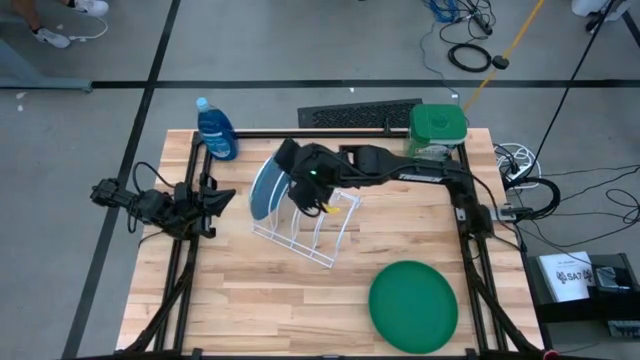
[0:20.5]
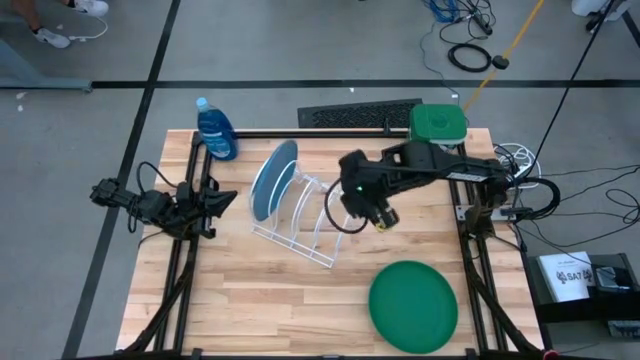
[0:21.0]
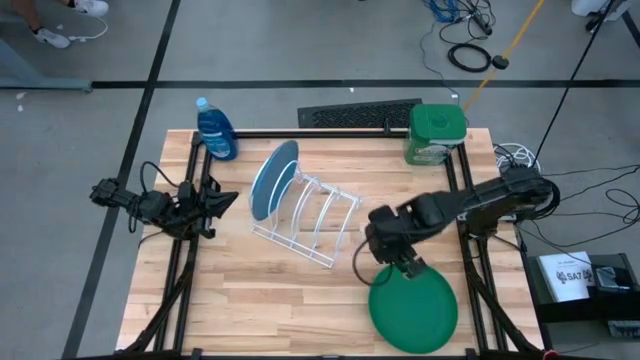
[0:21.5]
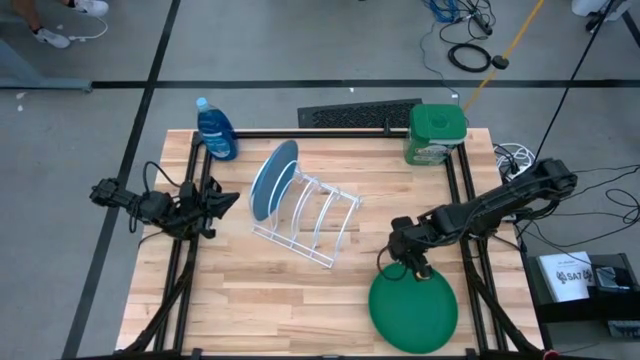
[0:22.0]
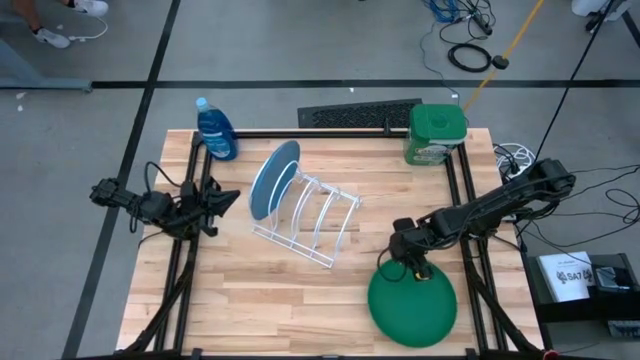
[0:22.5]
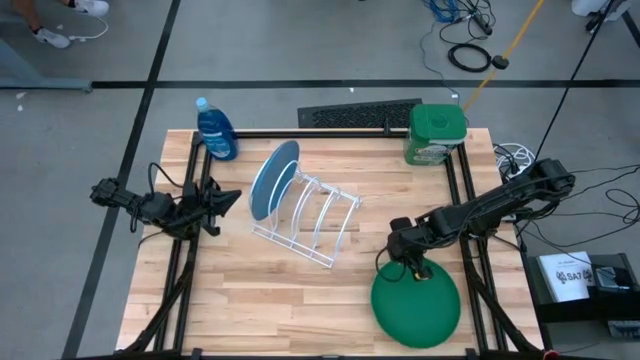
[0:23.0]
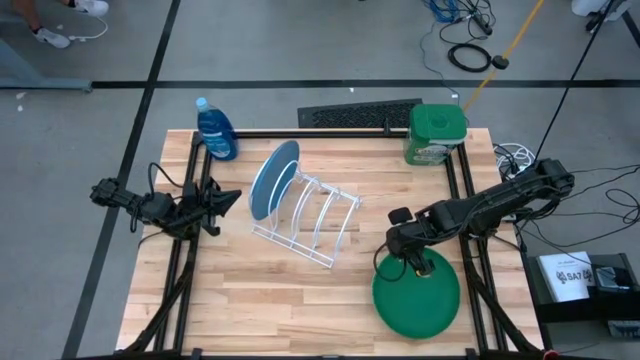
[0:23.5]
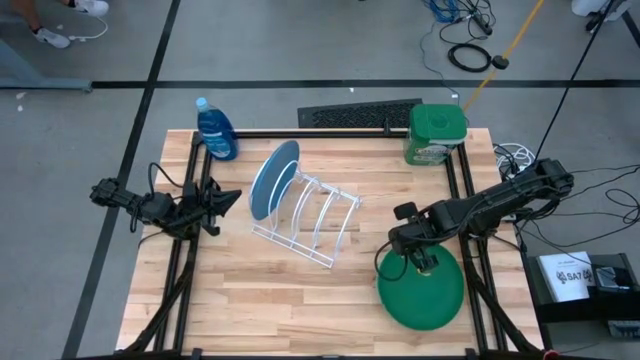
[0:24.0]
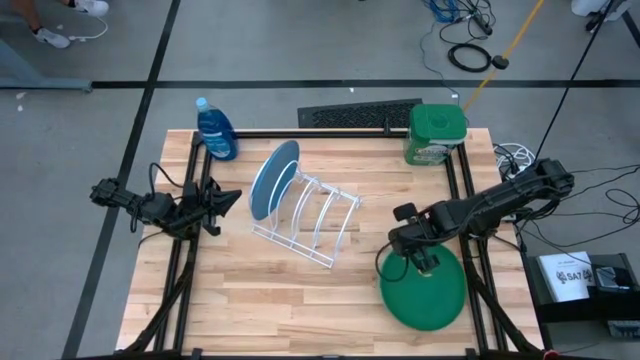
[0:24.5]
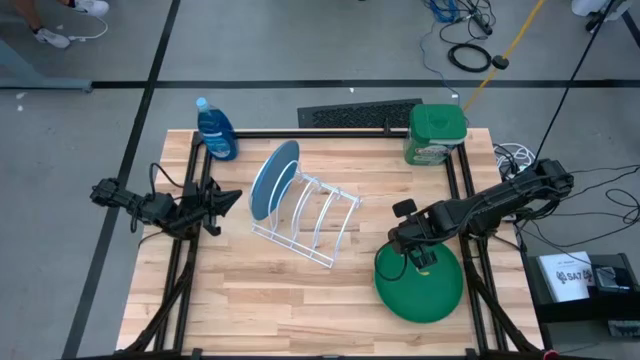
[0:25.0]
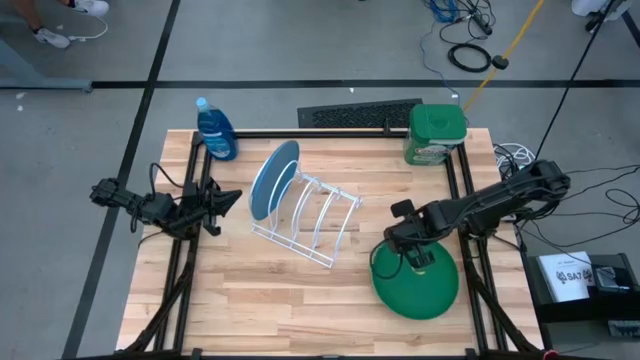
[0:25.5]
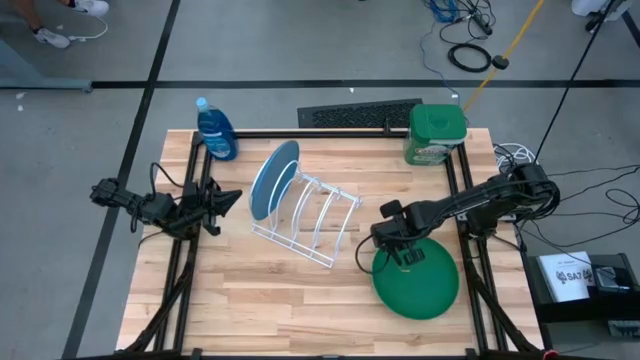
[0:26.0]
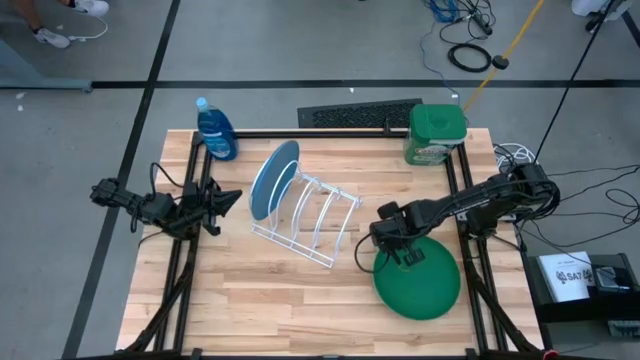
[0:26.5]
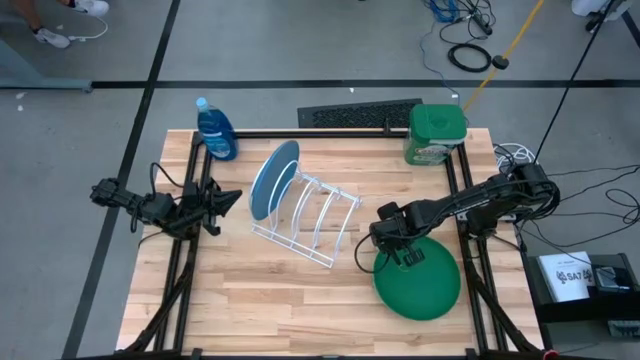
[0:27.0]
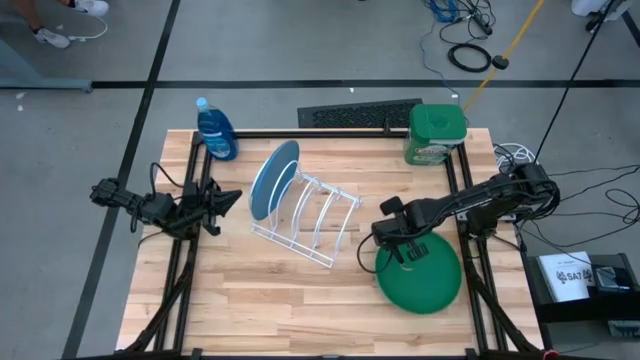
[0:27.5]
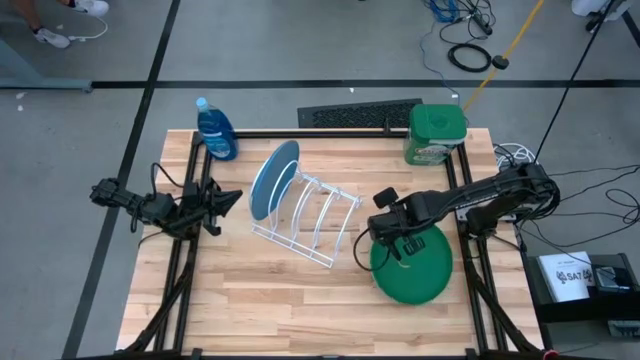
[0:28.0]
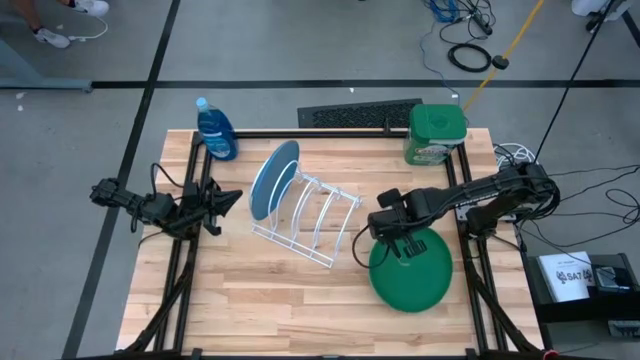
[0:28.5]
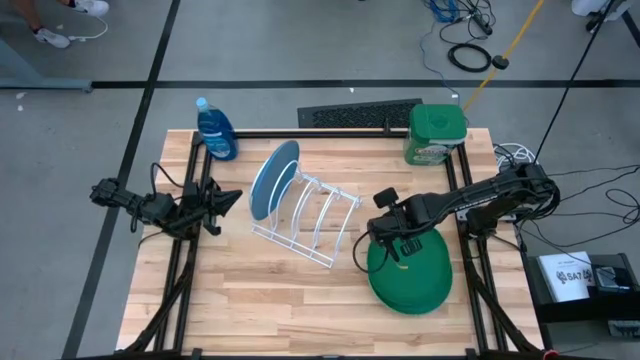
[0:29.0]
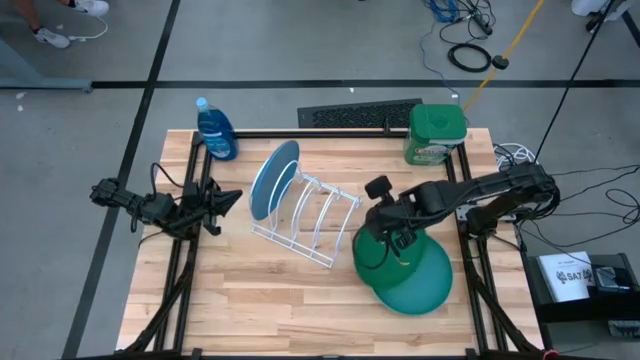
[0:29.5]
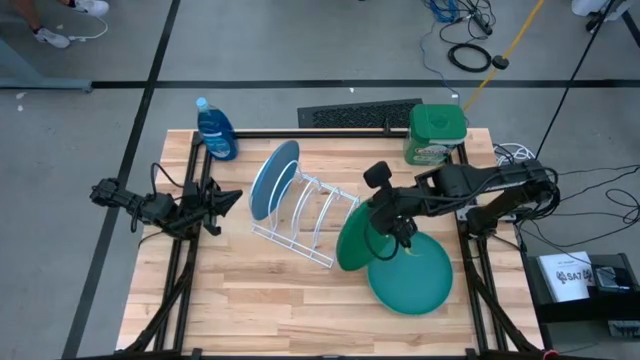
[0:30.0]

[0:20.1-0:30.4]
Task: Sort dishes
Put the green plate into the white dish rack

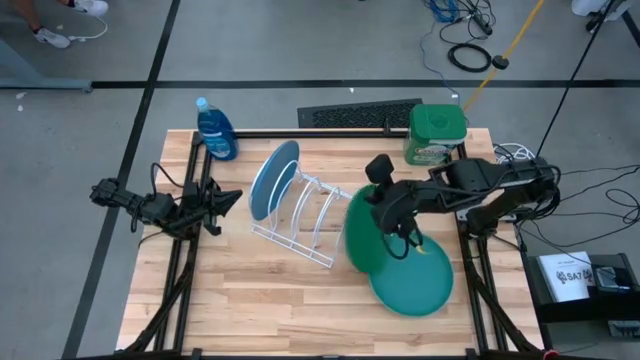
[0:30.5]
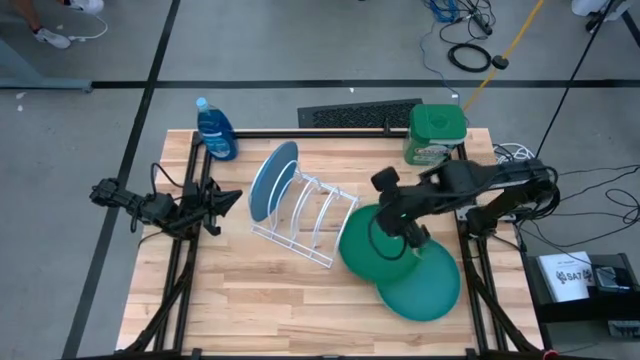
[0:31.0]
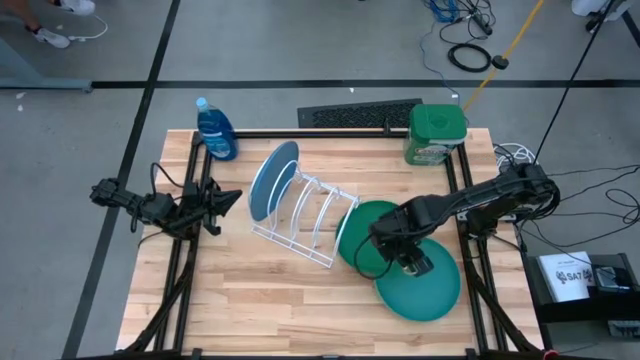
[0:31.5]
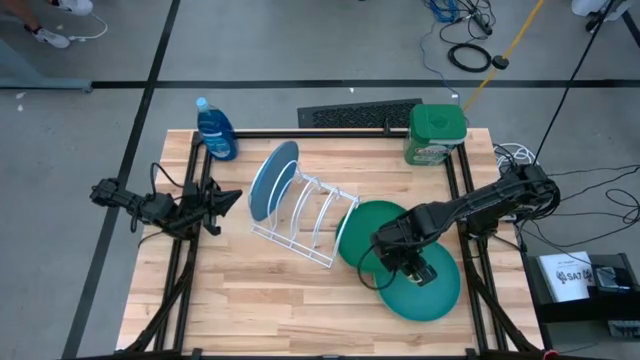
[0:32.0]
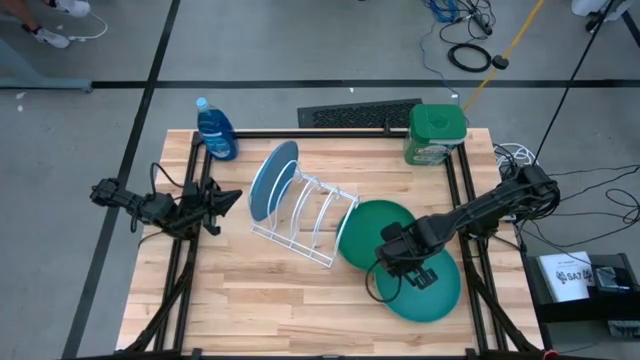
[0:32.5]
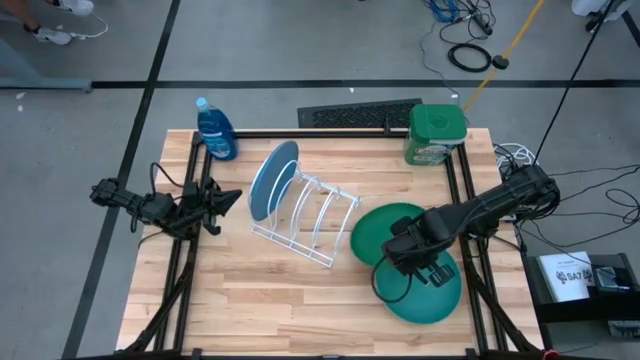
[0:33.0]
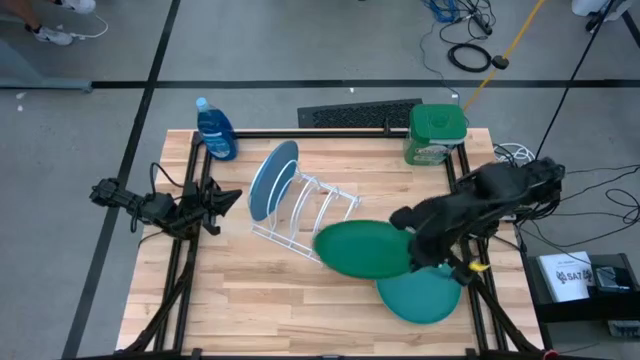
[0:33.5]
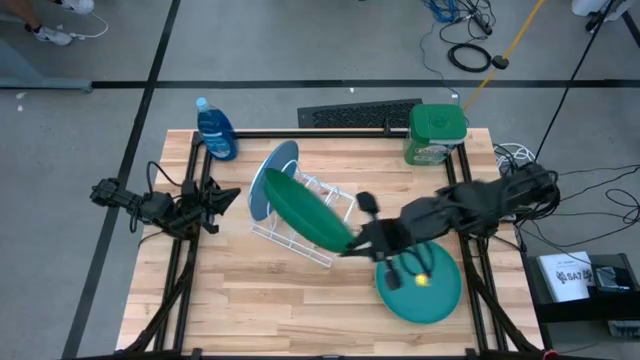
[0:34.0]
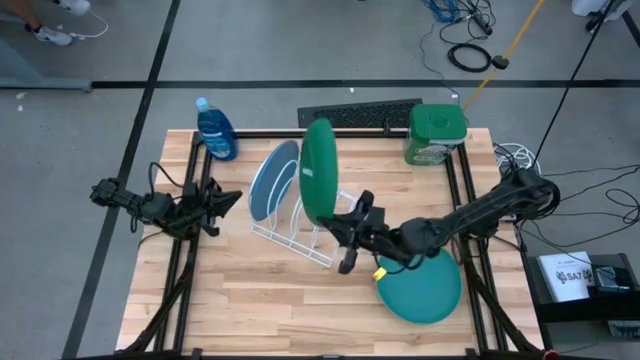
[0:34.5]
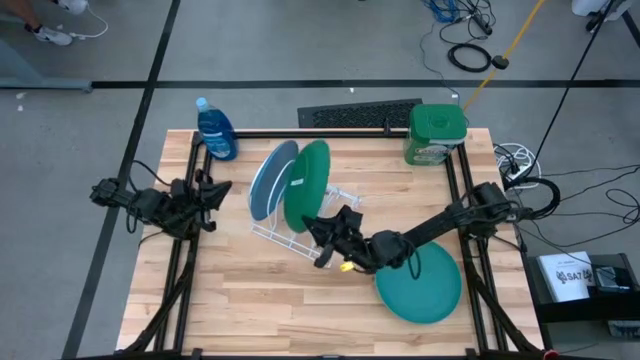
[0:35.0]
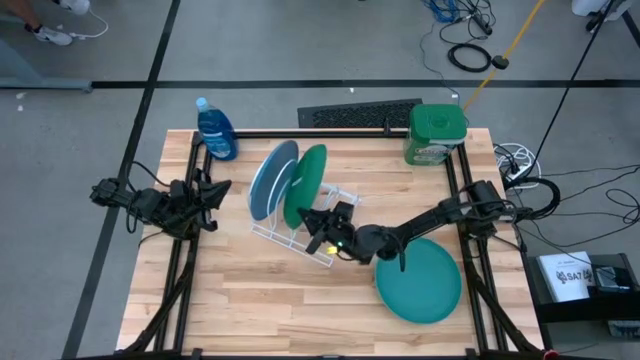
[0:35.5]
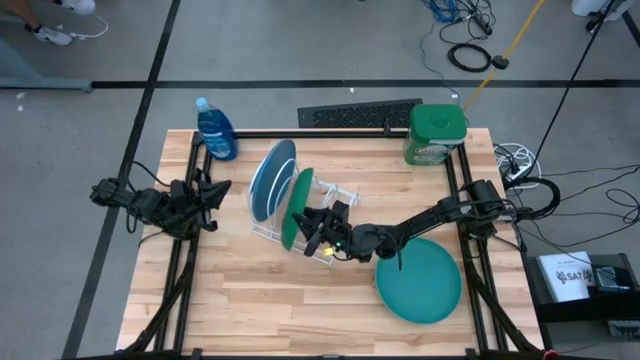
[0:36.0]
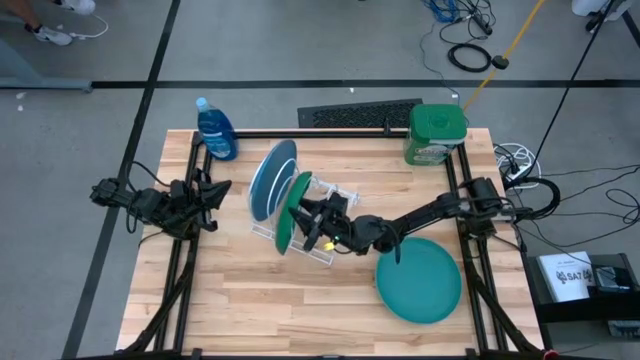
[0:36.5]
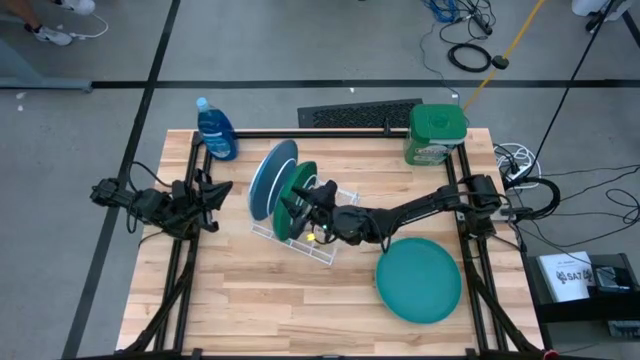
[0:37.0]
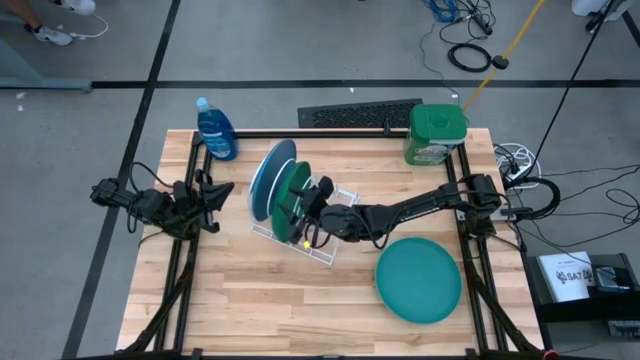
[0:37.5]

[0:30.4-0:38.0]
Put the green plate into the white dish rack

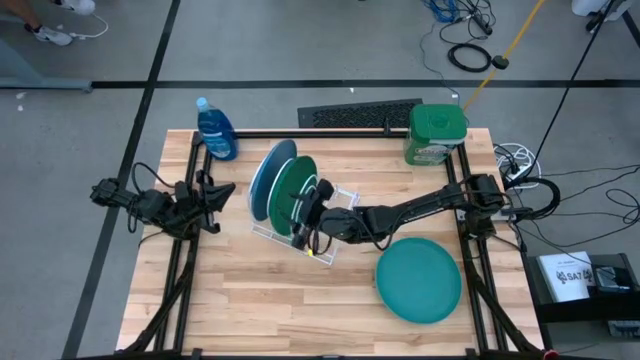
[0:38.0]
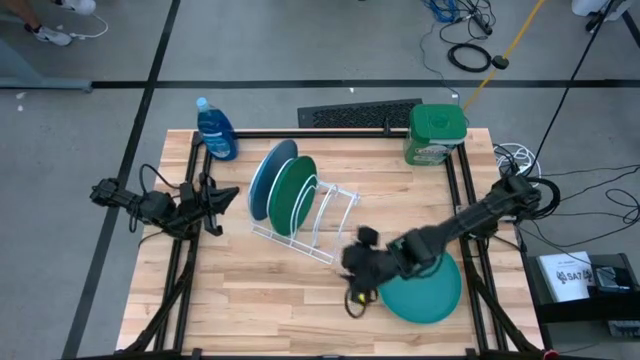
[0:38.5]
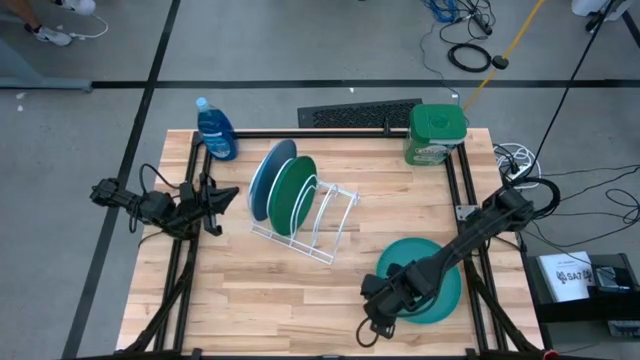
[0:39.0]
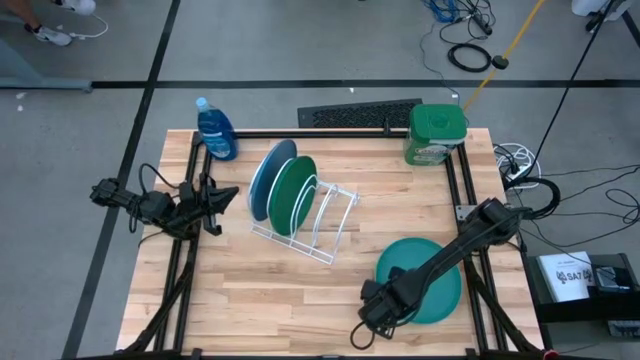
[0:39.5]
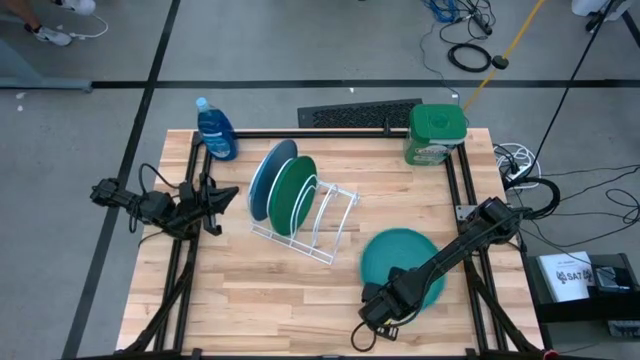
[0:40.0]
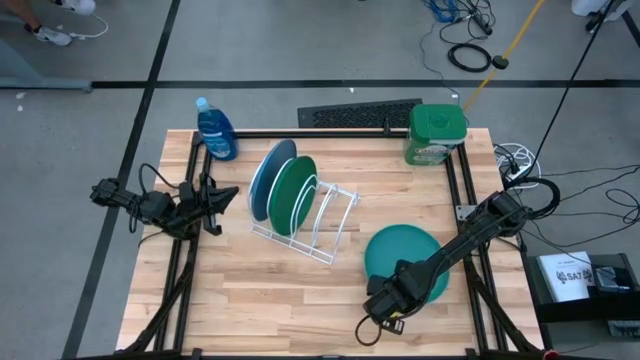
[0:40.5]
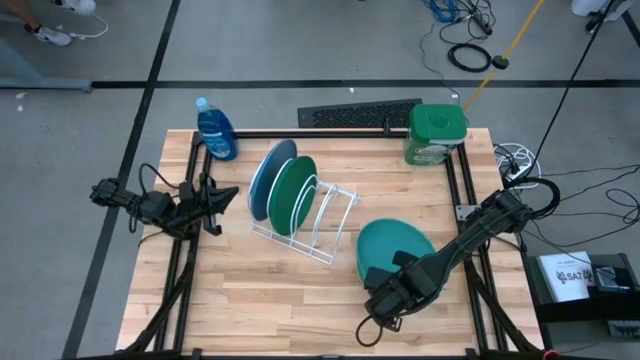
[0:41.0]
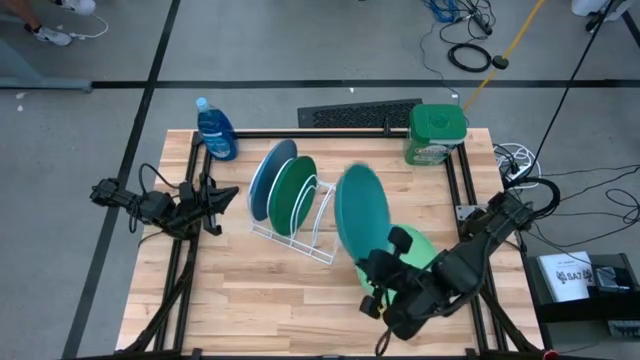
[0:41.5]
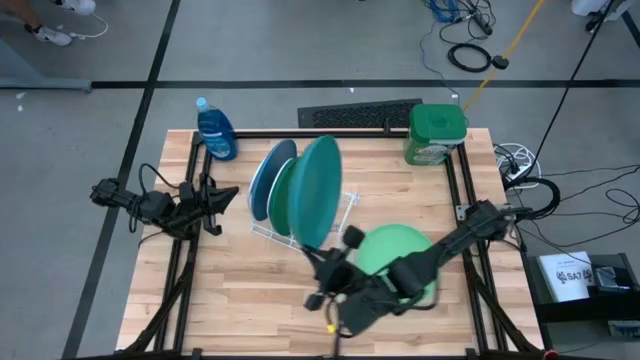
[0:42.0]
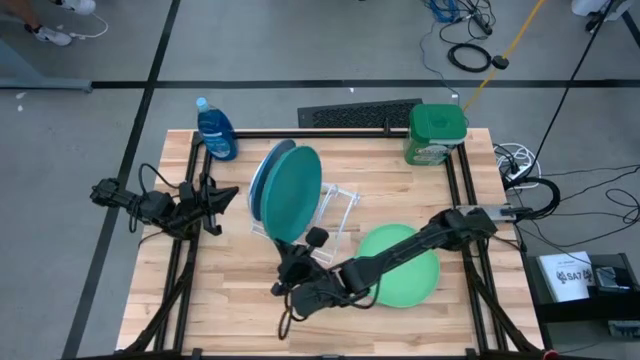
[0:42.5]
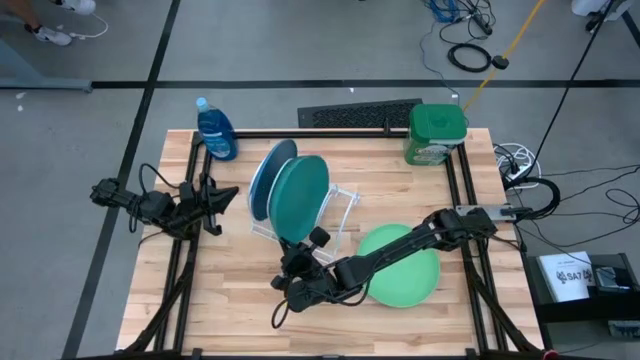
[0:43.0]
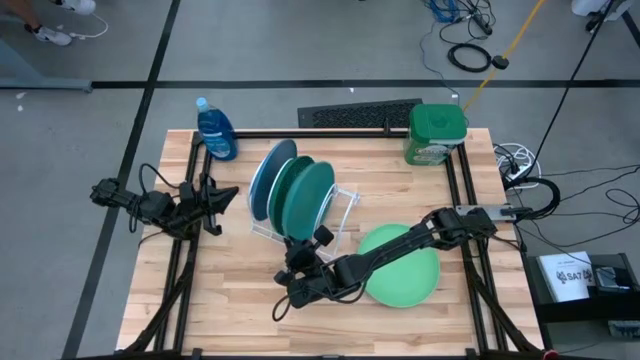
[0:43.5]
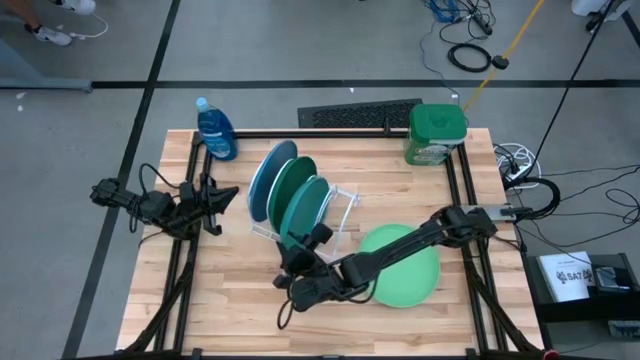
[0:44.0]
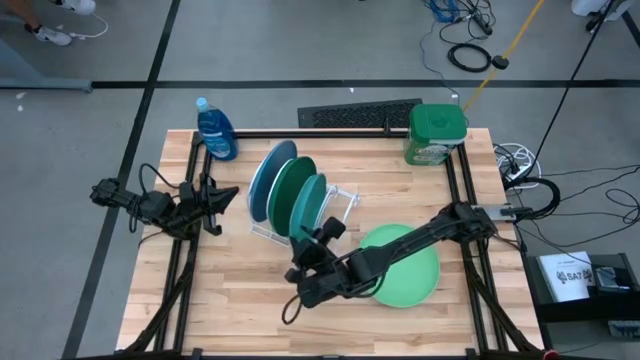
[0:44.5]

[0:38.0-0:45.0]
Put the light blue plate into the white dish rack
